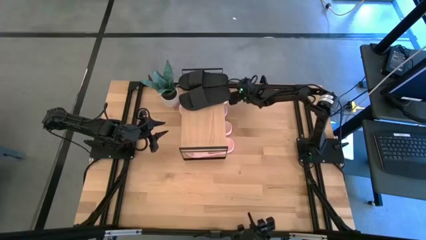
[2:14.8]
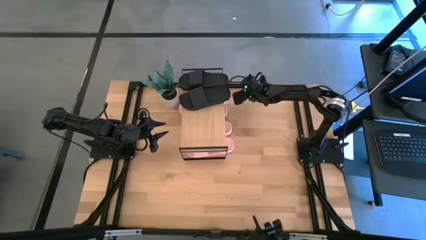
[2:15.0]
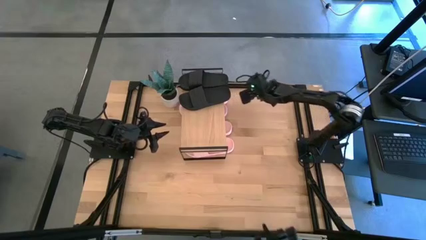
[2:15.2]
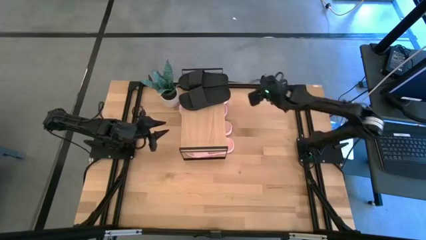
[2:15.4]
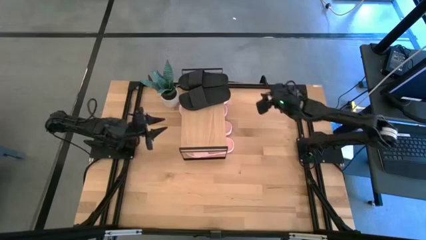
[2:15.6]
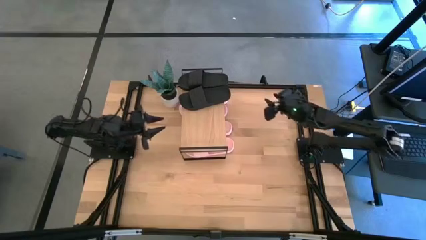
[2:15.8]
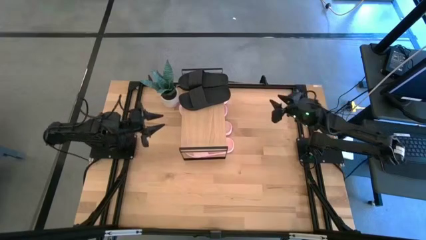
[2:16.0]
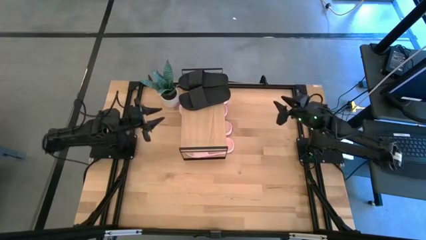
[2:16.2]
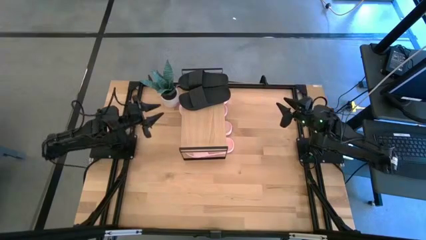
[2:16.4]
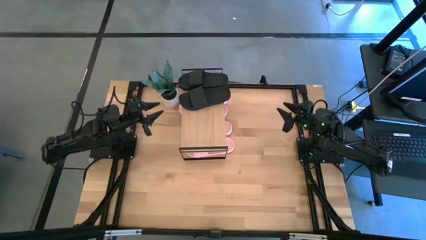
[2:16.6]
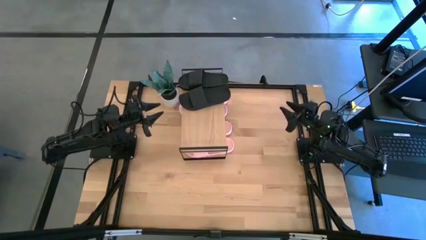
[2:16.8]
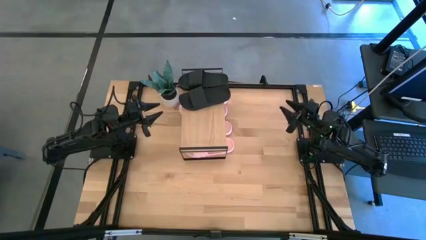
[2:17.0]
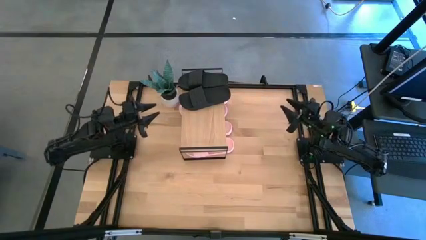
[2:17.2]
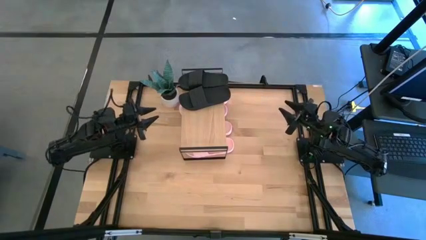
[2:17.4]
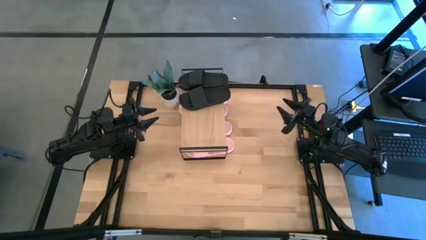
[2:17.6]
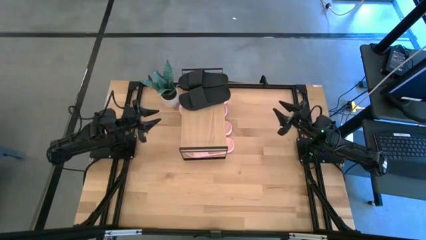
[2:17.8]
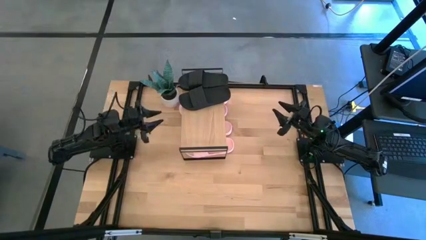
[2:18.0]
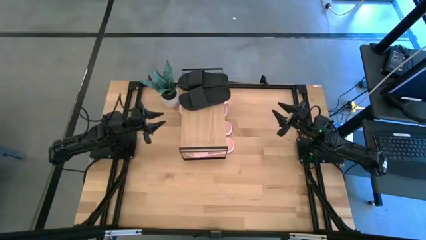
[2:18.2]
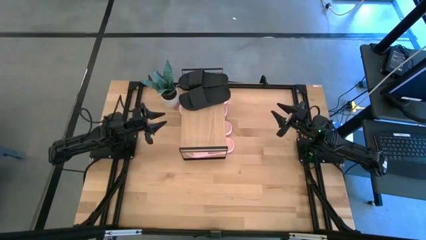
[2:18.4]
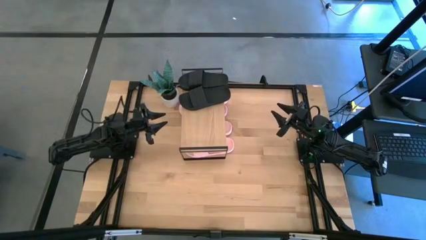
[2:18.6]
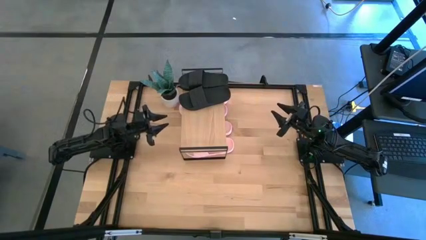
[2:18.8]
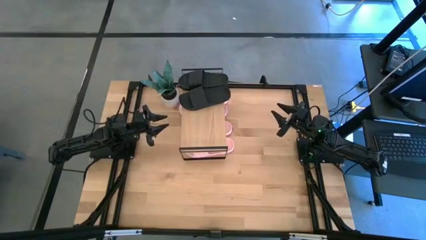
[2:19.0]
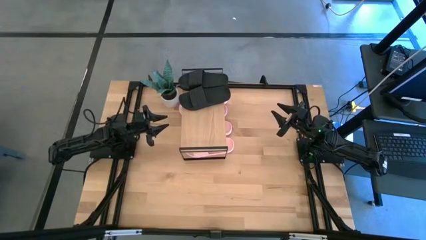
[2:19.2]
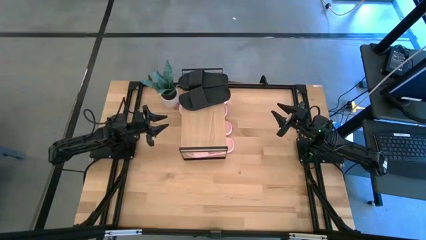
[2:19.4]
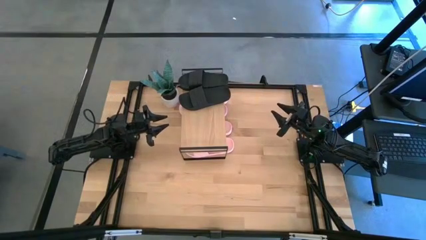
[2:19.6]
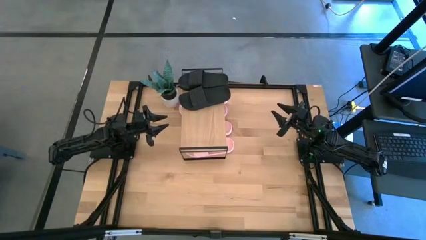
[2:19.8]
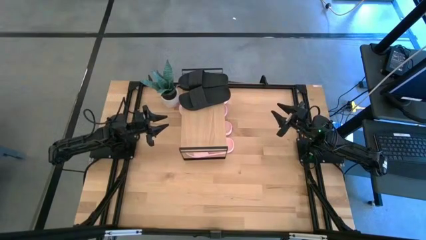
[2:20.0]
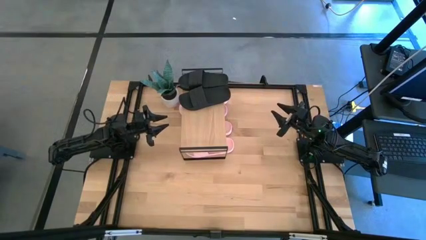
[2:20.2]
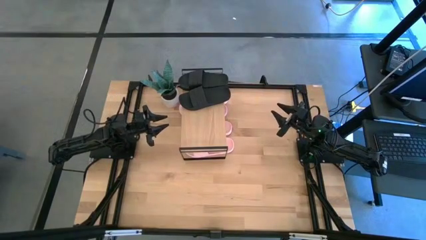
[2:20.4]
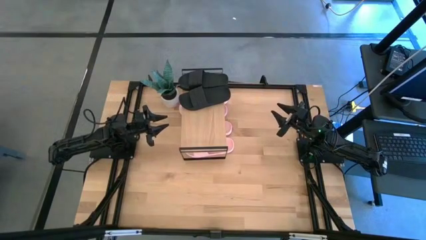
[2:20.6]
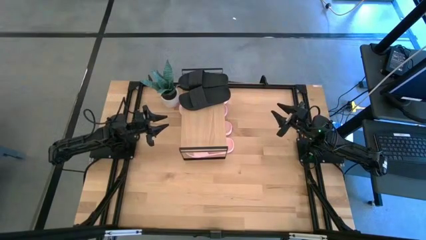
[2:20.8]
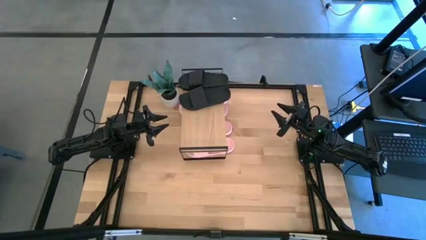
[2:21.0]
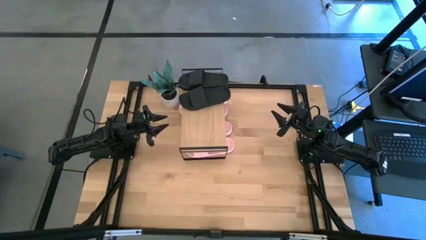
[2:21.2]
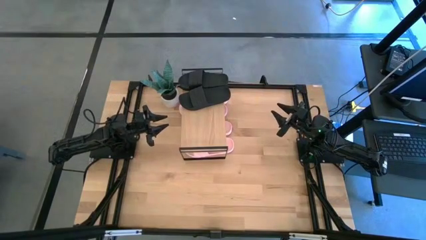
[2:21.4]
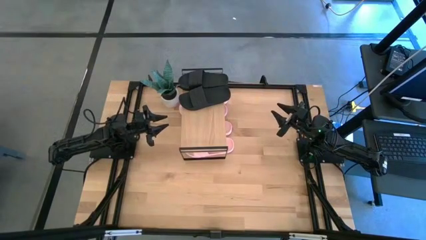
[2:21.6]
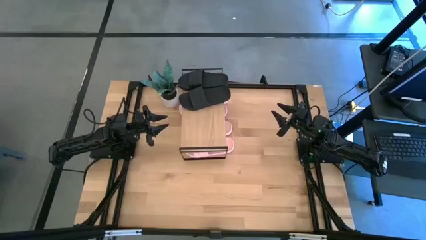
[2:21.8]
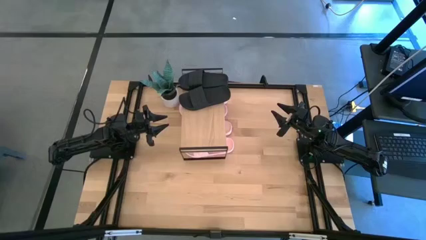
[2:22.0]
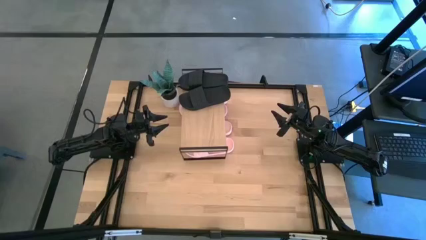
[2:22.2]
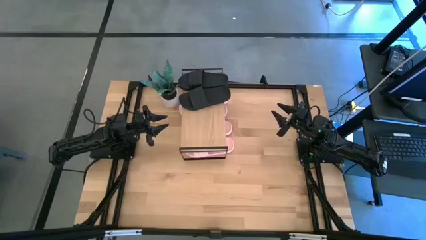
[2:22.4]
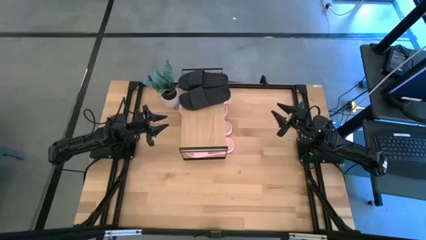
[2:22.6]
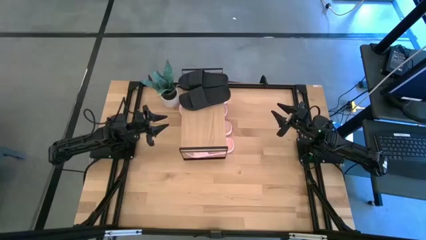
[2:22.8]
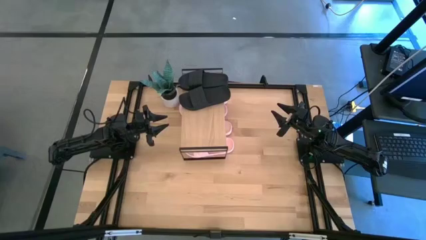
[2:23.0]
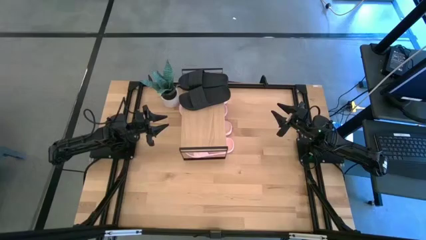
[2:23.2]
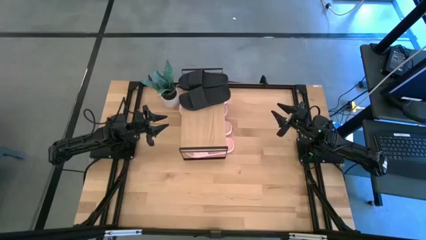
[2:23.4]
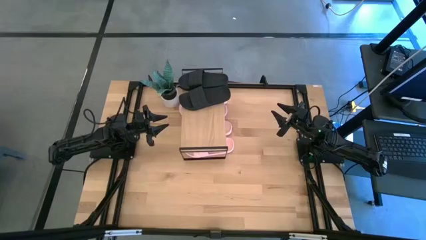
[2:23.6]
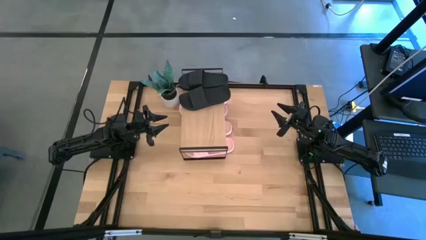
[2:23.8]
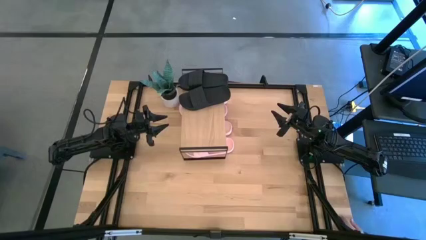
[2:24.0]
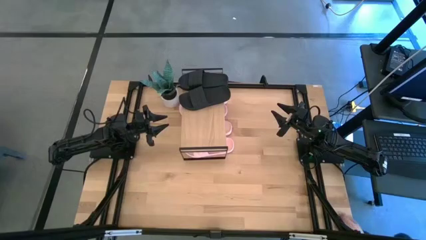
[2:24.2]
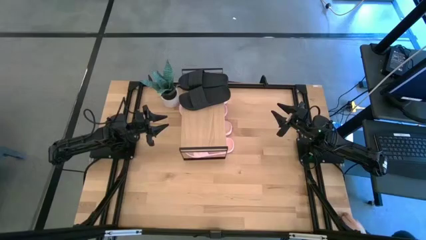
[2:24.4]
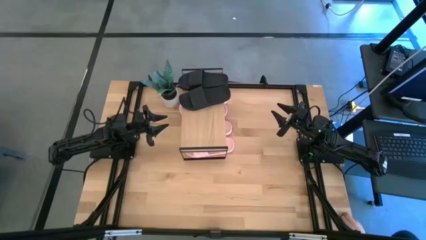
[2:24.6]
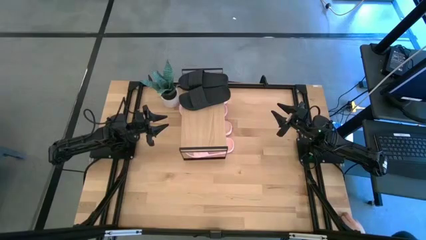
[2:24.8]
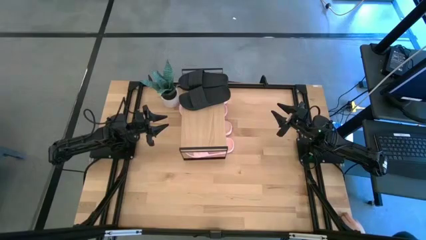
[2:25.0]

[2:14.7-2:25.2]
Task: Pick and place slides into the shelf
Return to Home Position

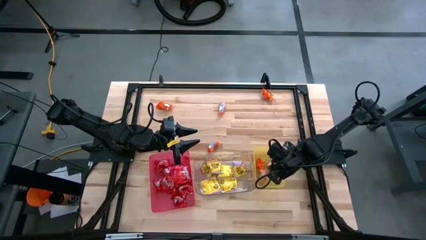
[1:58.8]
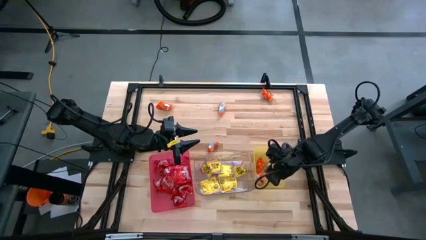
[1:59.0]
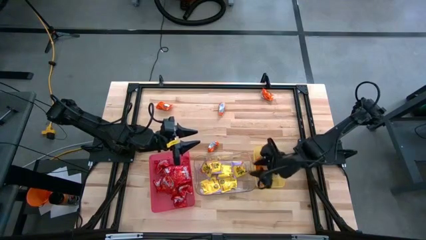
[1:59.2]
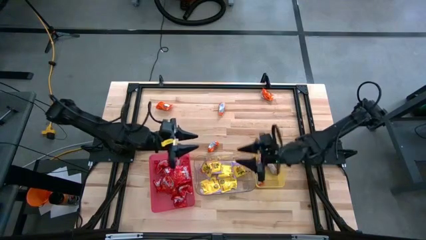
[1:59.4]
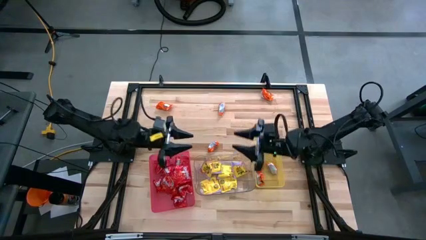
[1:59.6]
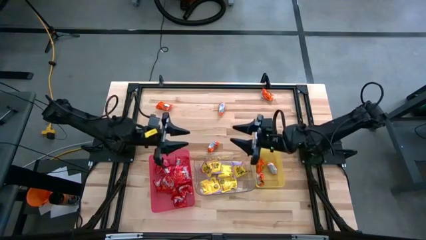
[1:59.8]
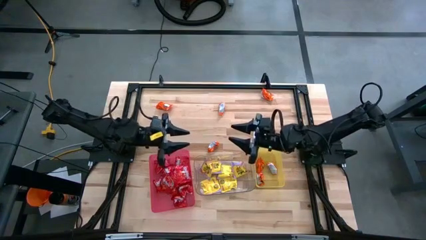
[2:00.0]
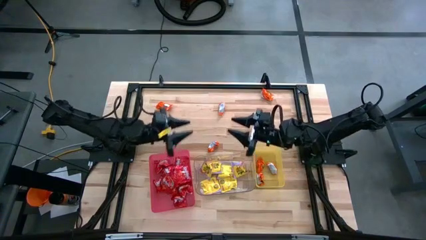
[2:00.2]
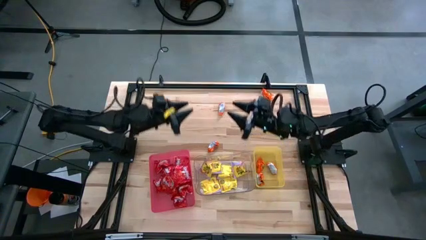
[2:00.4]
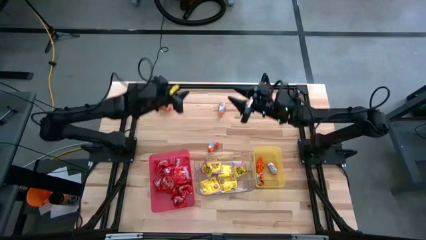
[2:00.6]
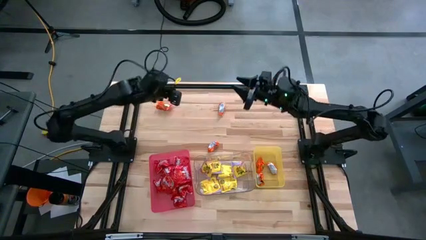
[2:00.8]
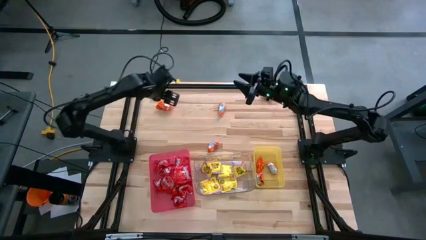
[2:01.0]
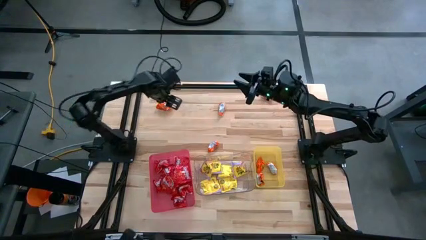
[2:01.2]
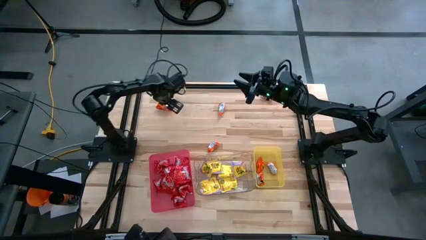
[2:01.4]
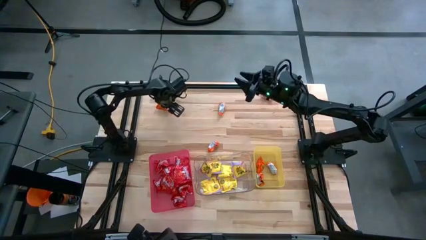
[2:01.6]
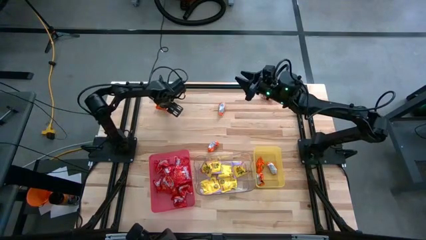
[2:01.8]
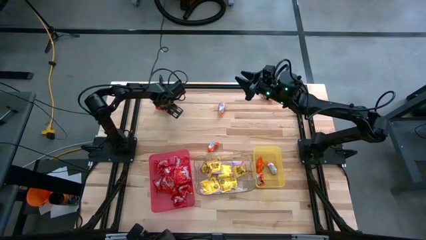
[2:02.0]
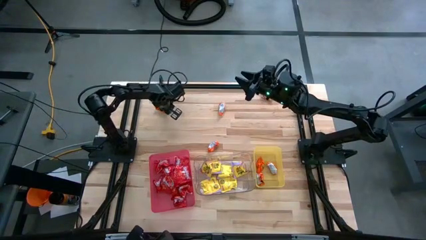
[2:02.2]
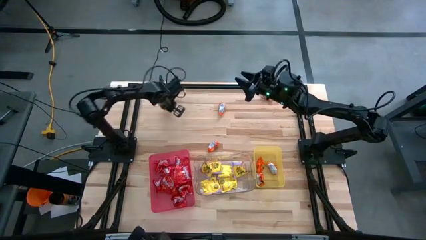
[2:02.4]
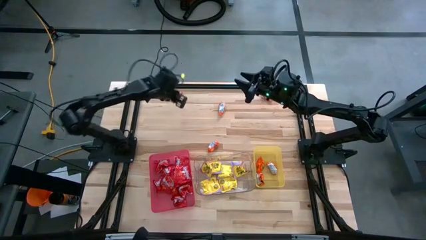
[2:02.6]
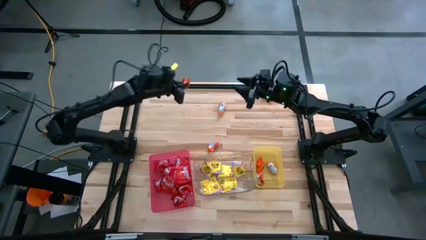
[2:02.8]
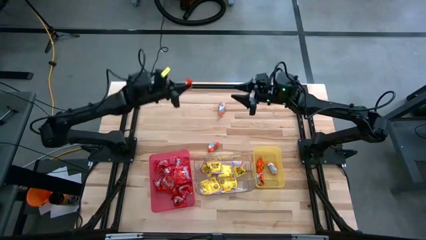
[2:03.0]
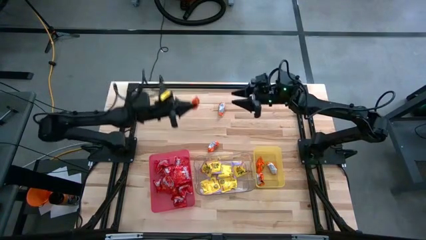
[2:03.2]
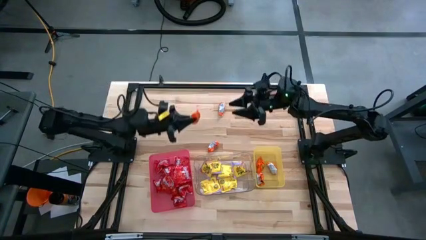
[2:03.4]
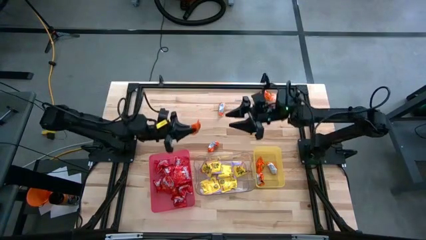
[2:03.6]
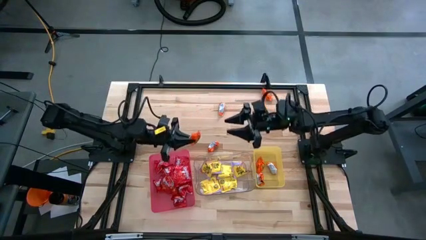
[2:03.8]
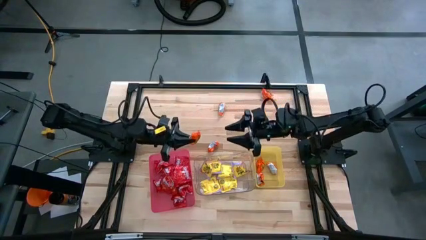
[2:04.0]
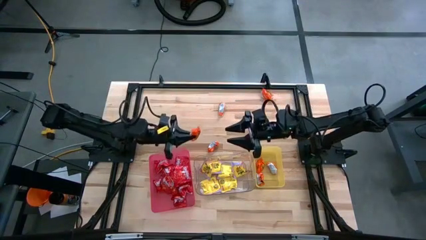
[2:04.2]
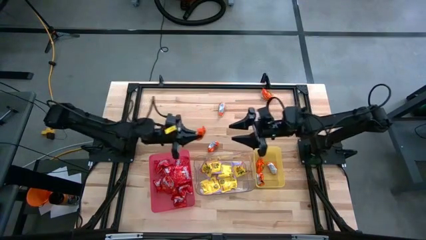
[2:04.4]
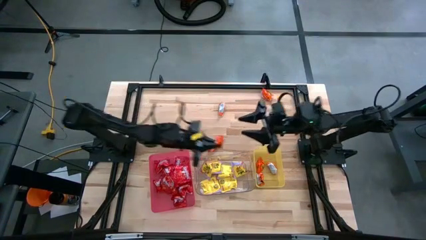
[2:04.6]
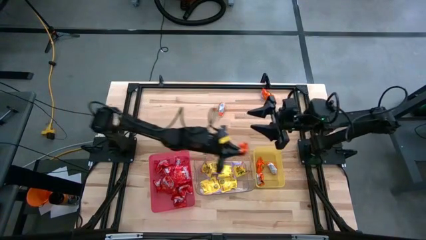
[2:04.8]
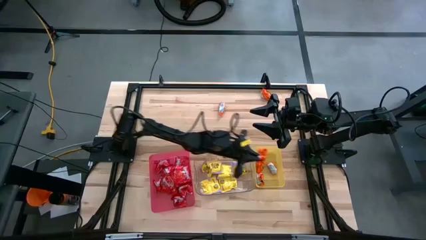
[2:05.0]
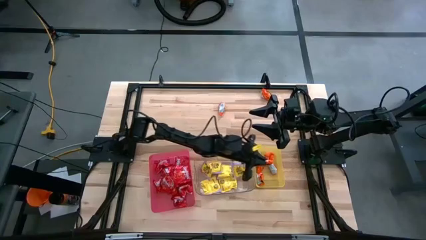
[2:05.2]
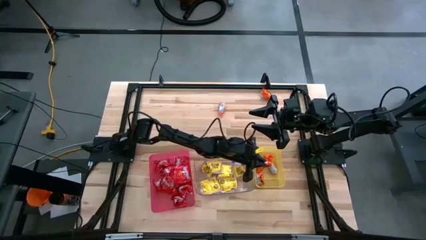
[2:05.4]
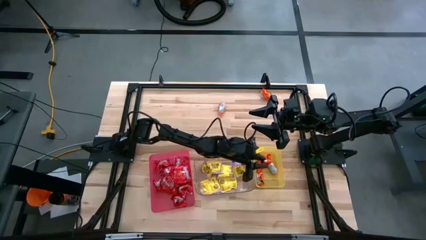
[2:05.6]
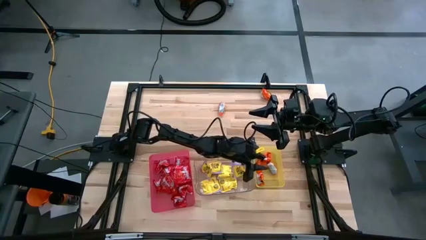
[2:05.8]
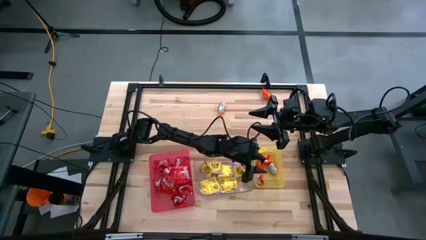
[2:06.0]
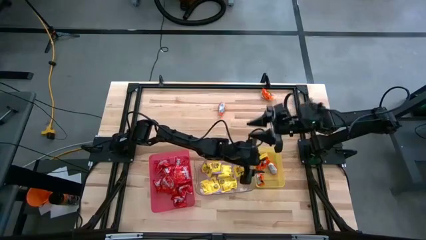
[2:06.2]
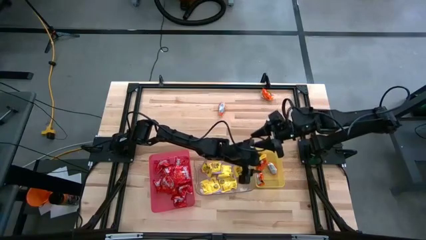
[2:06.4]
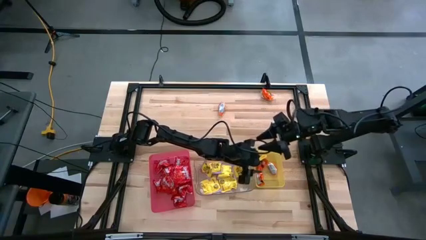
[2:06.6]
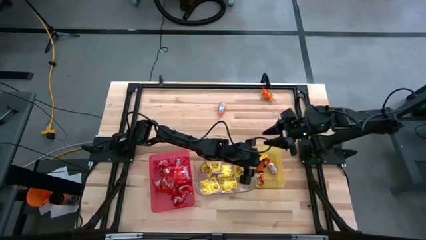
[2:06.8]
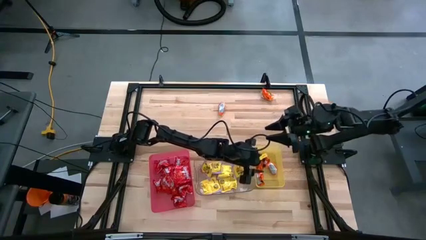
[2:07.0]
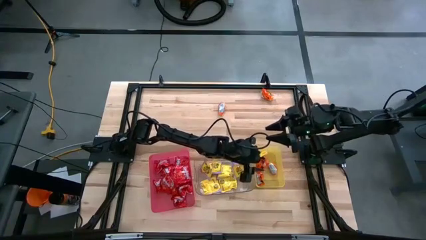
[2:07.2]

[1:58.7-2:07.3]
Task: Sort candy
Put the orange chocolate into the yellow bin
